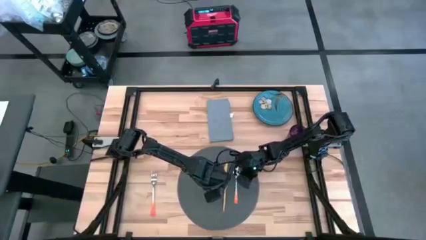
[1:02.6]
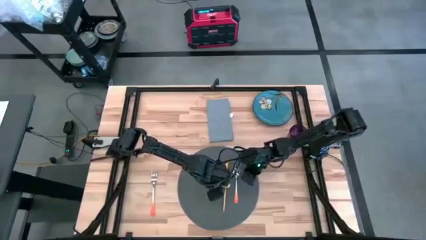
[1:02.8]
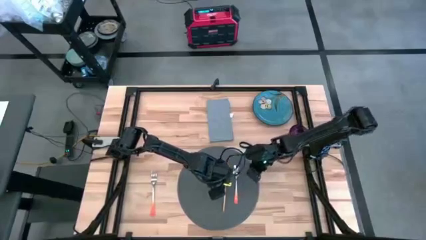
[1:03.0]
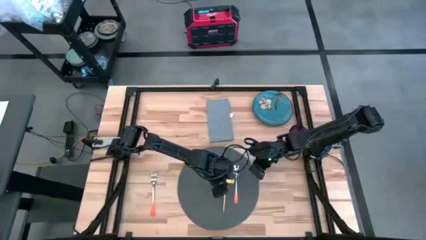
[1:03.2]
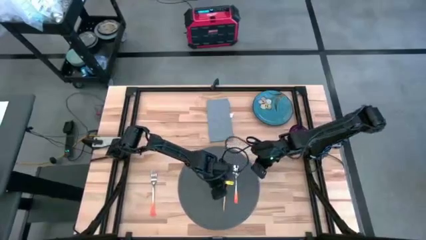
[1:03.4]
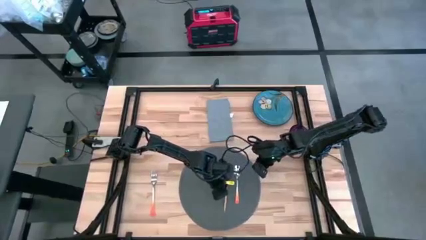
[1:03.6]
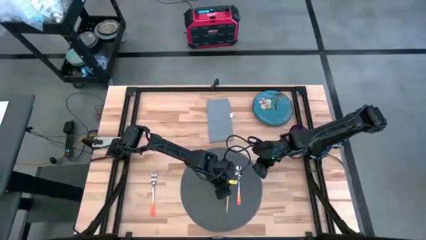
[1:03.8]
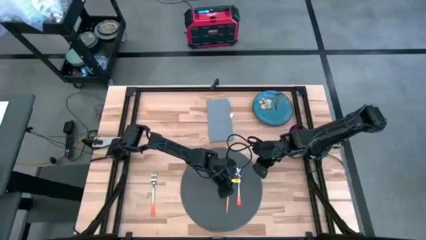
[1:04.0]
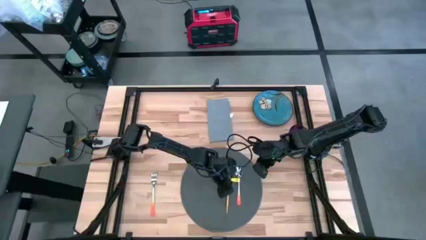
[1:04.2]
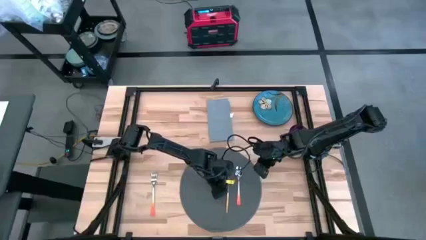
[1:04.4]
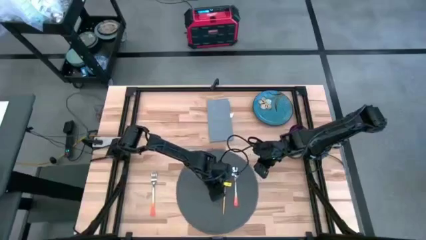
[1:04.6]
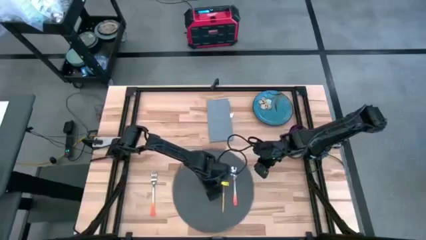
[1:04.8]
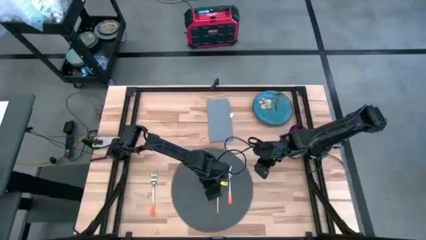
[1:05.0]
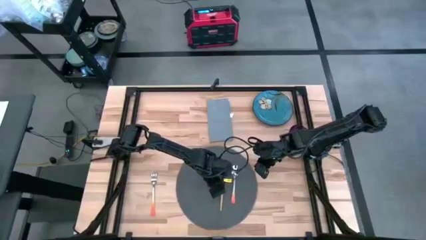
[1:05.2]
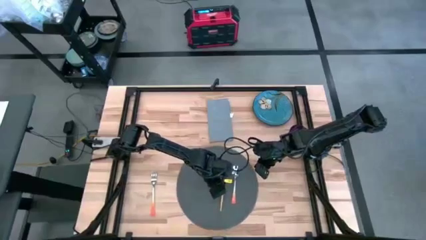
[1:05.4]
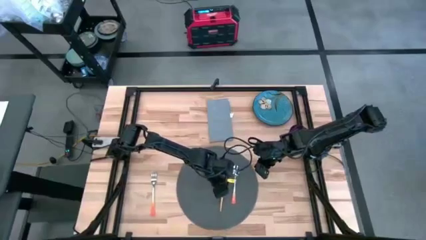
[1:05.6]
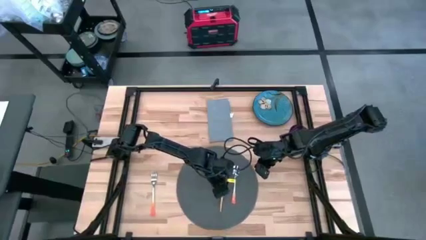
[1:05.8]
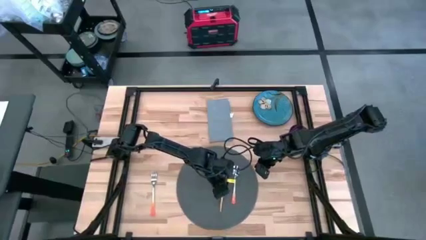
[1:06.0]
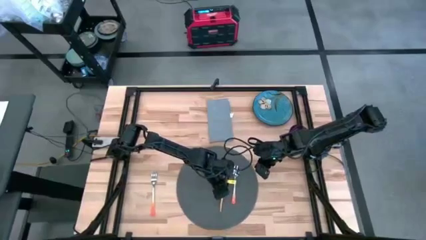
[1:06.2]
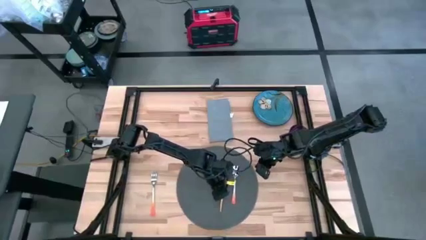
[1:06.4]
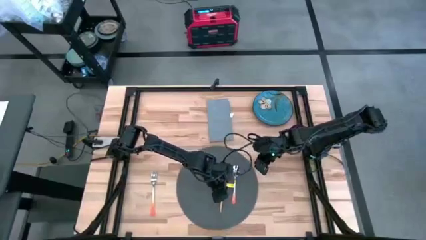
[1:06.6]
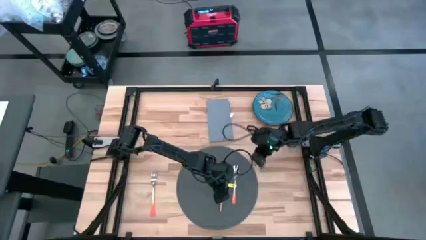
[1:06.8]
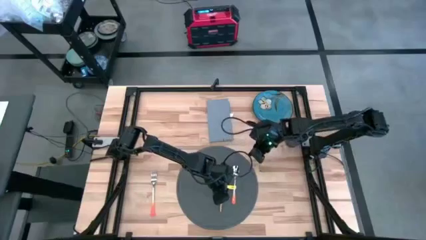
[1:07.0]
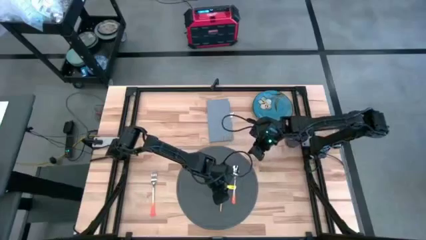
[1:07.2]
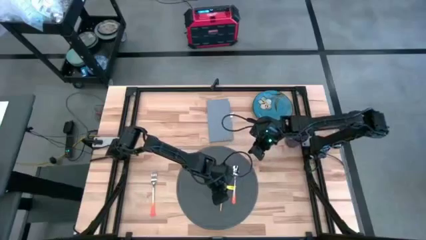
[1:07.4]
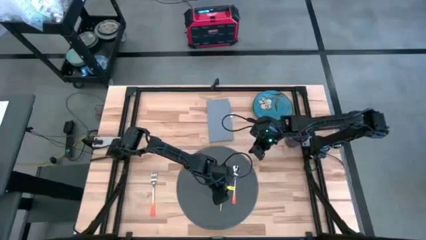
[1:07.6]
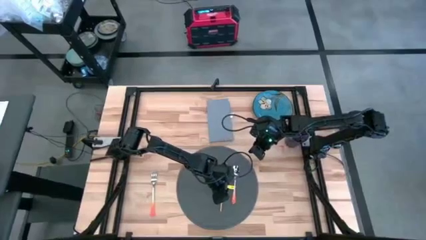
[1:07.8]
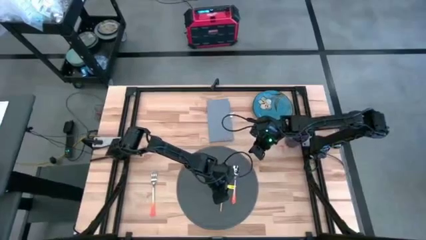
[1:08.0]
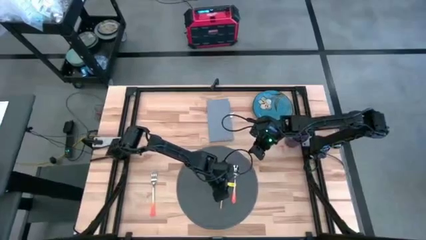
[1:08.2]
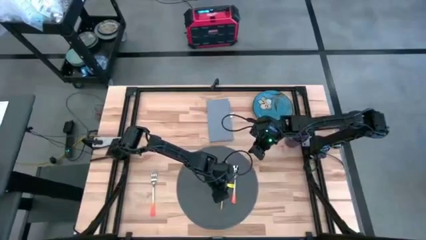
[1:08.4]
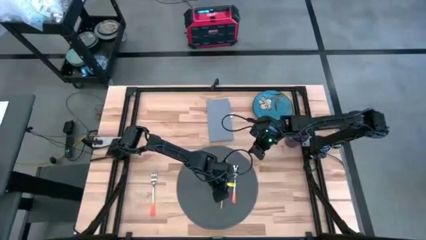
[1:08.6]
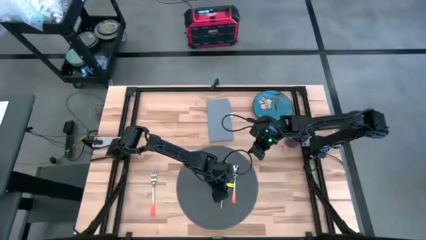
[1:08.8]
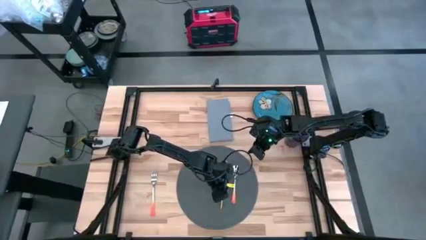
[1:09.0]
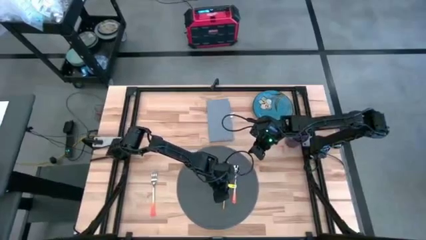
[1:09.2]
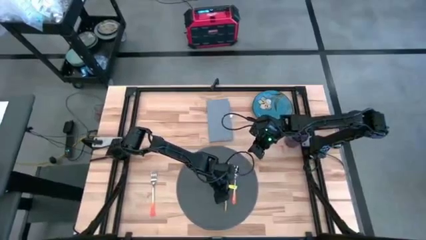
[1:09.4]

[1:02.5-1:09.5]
Task: Set table place
Adjust the gold table knife on the gray table mat

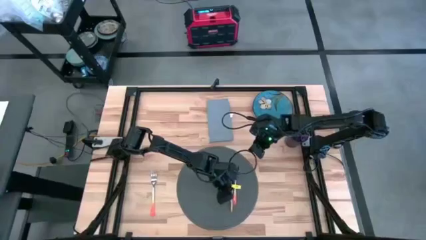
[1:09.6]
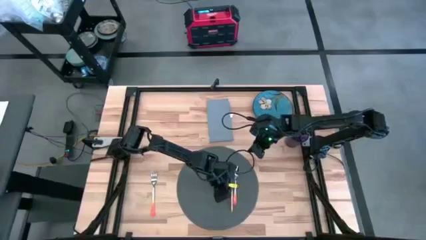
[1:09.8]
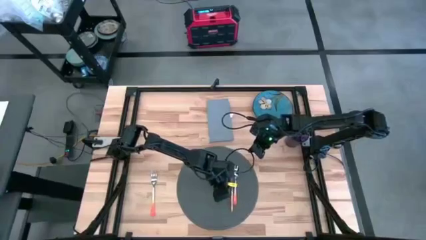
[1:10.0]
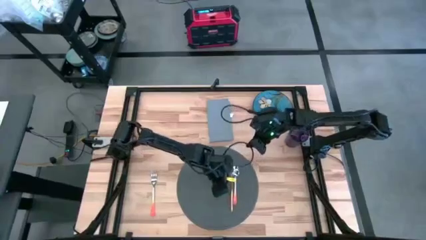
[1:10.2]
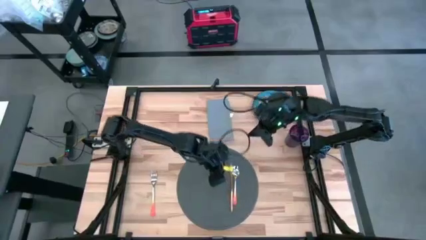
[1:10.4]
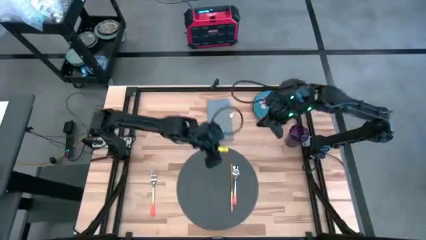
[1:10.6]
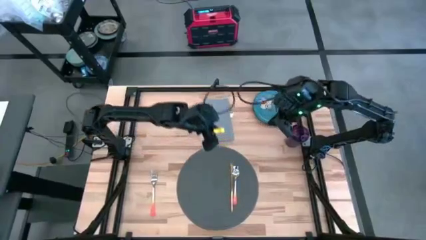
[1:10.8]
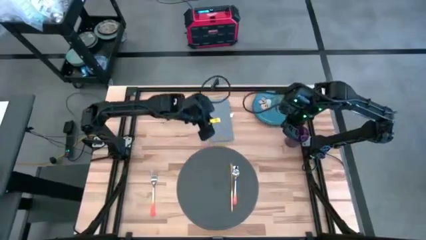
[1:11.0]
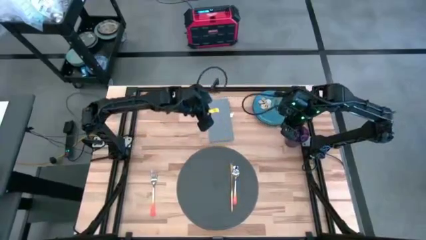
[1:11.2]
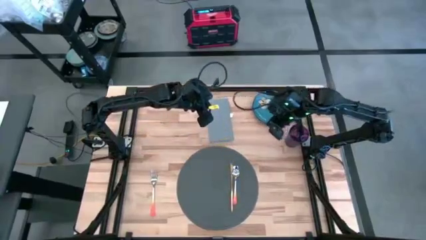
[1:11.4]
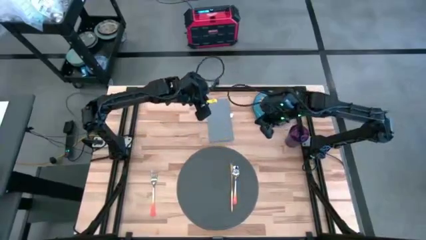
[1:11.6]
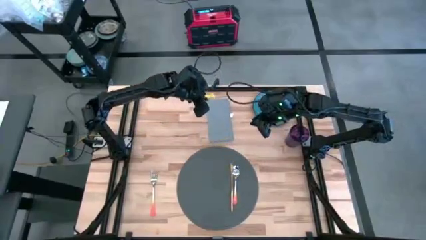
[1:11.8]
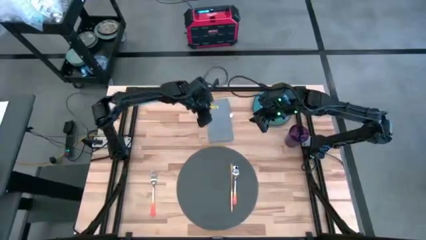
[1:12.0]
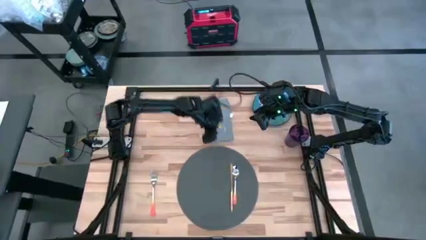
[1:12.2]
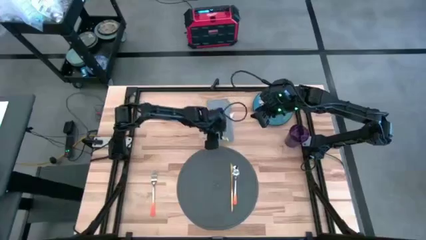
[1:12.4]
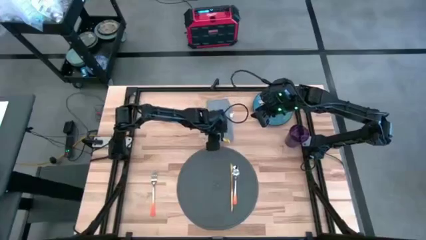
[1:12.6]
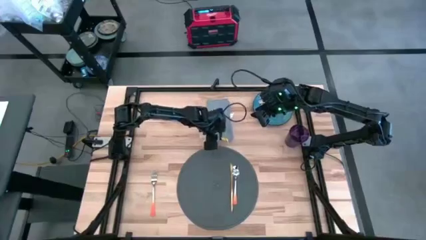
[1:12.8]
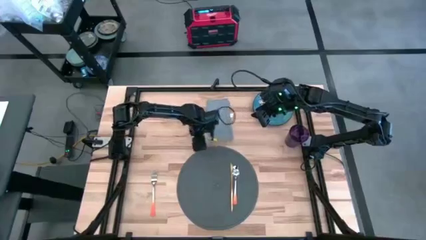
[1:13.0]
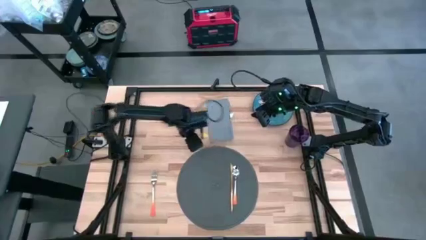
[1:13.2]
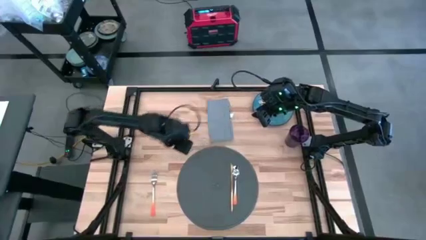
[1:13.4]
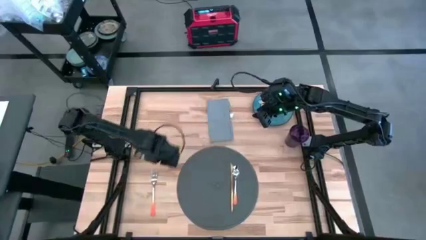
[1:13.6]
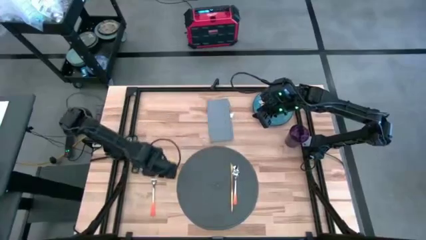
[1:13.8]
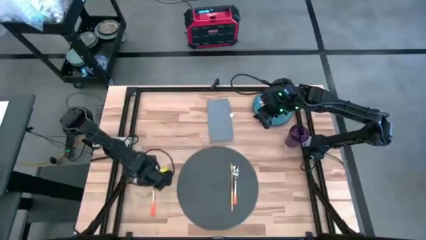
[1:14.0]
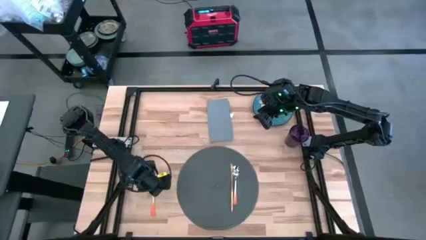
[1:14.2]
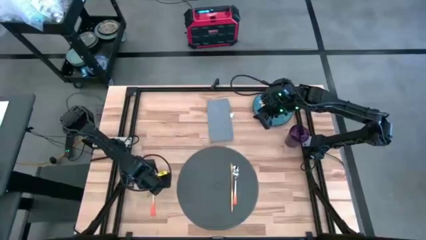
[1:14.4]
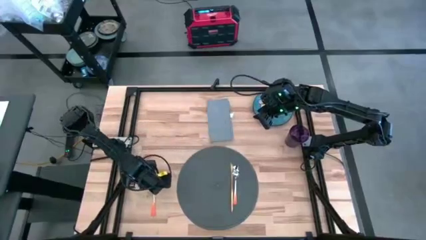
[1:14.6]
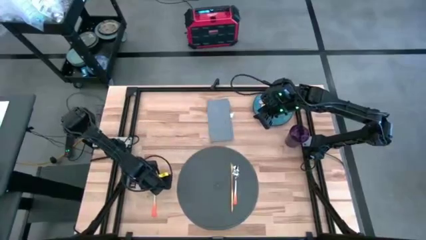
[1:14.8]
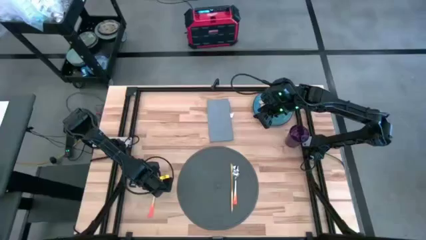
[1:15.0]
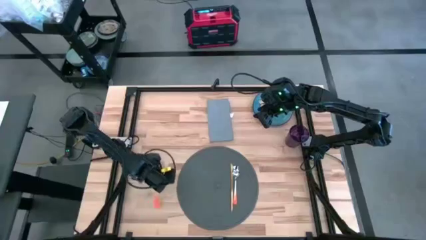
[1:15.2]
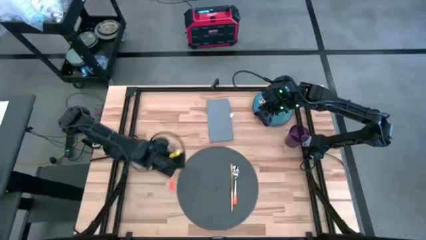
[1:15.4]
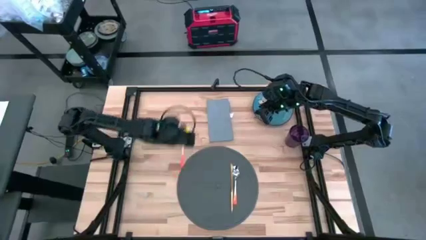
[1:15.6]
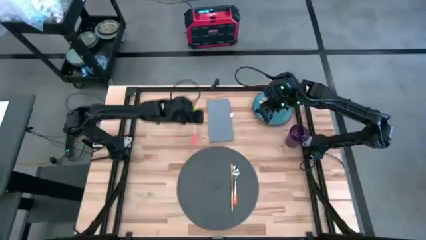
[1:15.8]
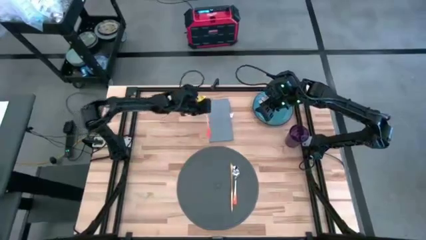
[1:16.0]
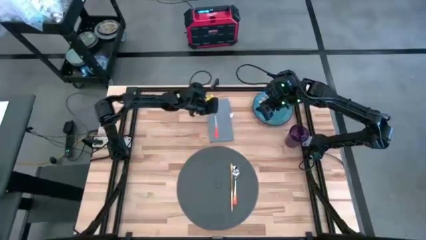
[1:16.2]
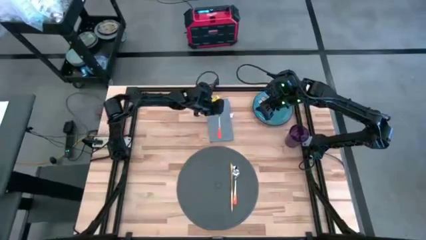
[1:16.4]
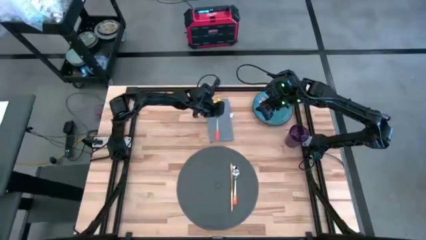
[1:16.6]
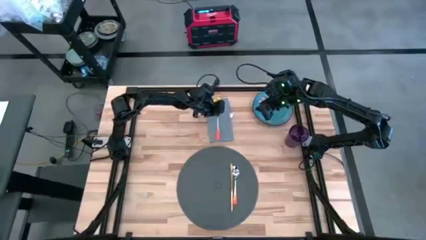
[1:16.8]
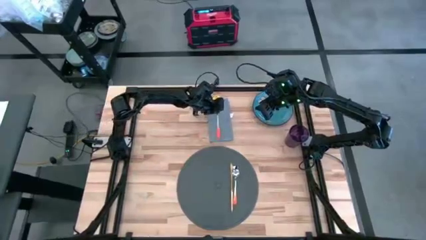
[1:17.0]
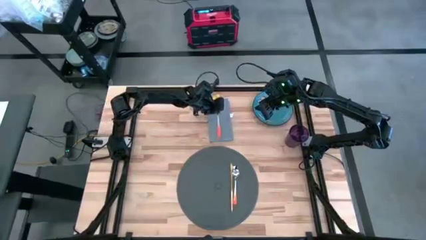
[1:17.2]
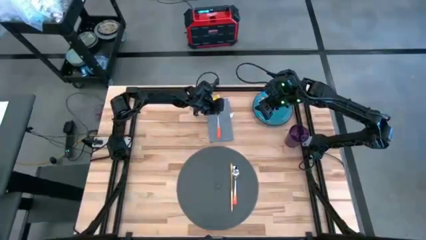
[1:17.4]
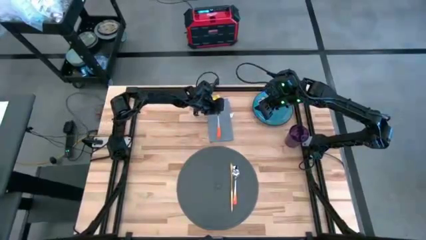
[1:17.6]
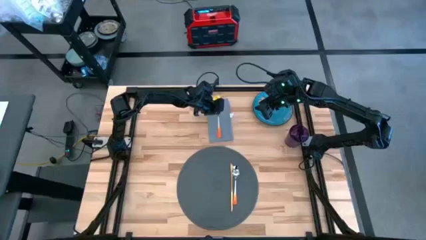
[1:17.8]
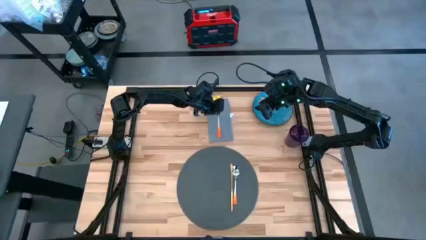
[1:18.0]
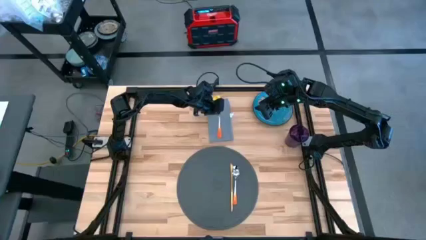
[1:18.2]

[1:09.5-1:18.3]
Put the orange fork on the gray table napkin

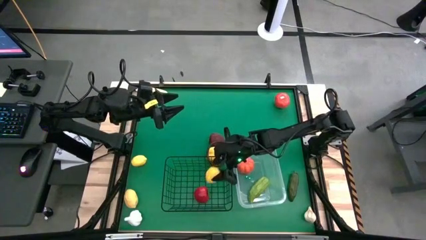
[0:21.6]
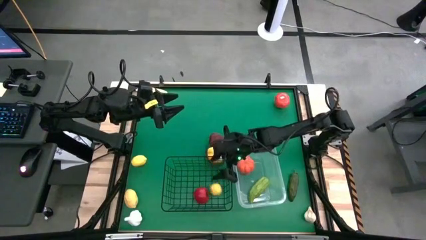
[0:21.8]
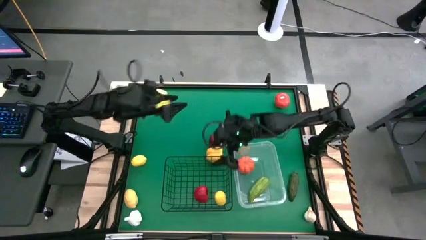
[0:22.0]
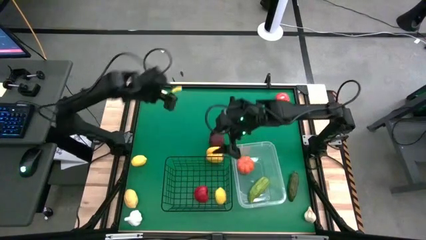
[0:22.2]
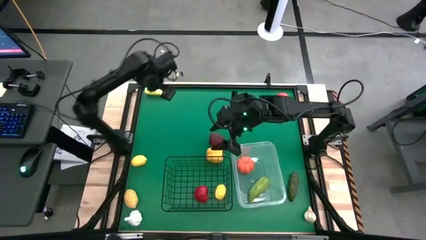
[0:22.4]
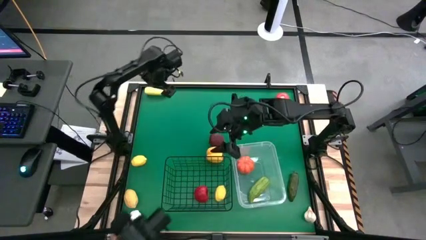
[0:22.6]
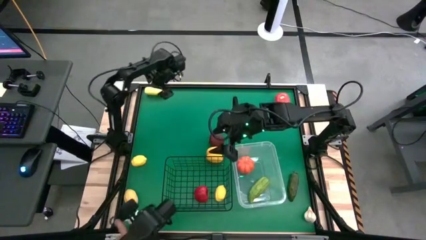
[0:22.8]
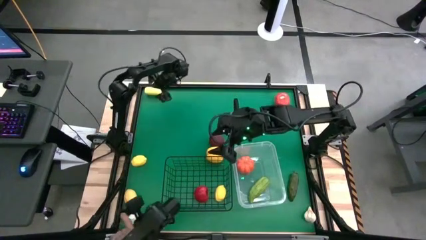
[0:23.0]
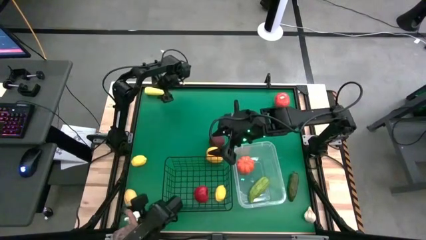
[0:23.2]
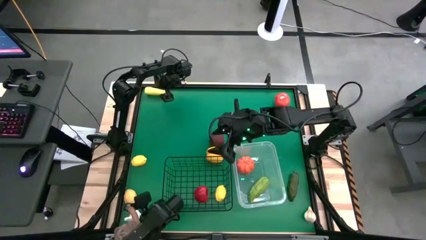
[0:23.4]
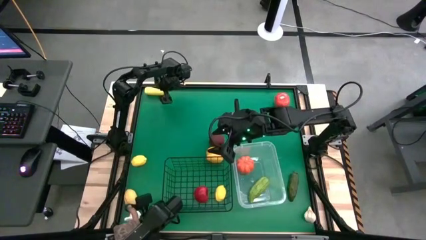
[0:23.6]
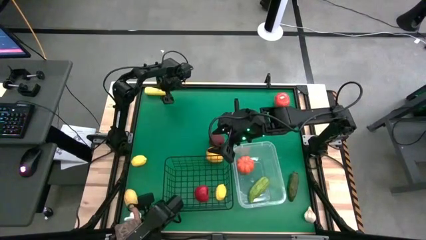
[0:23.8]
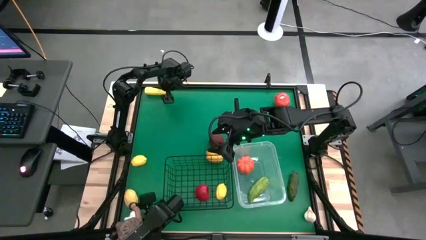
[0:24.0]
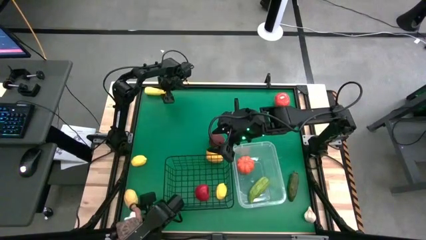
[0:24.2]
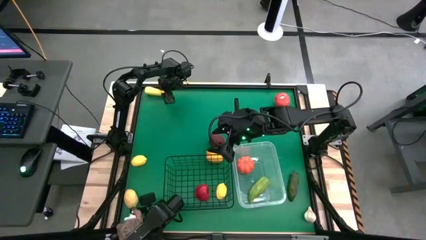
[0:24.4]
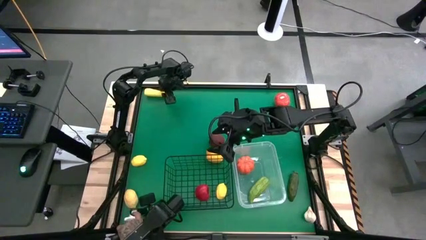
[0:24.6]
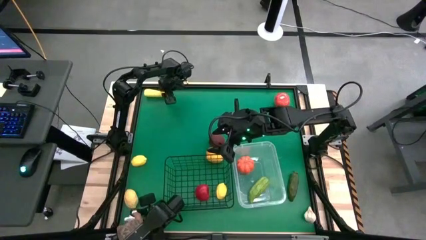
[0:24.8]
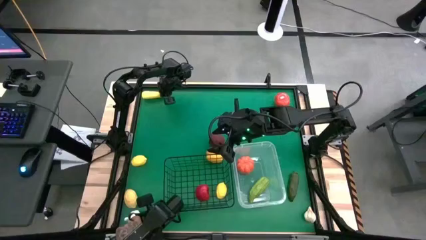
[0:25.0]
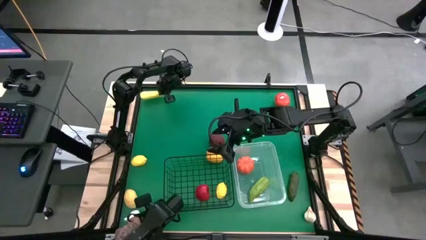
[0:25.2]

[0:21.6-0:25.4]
Task: Sort produce into baskets
Put the corn into the transparent bin
